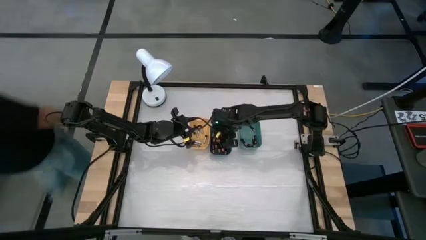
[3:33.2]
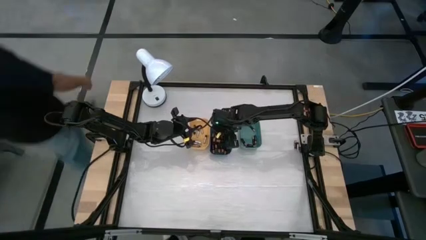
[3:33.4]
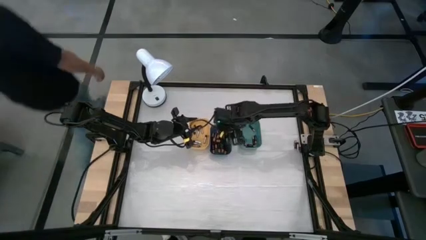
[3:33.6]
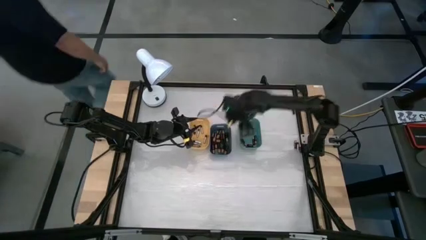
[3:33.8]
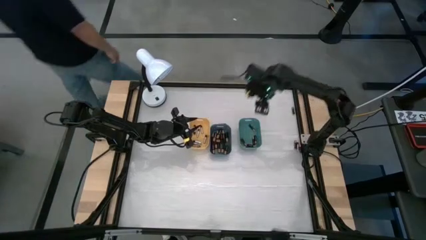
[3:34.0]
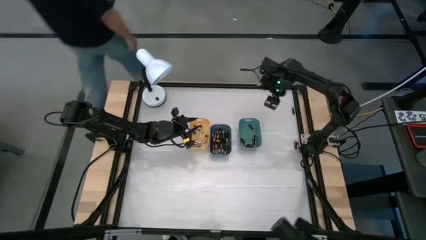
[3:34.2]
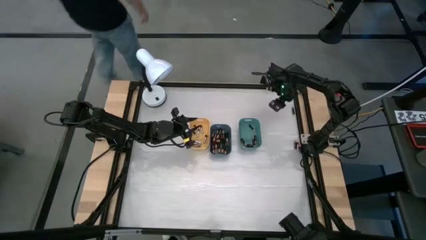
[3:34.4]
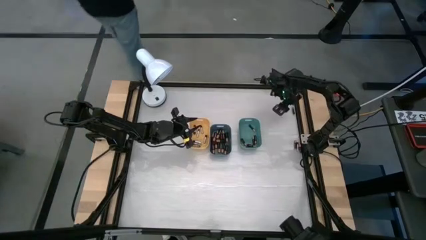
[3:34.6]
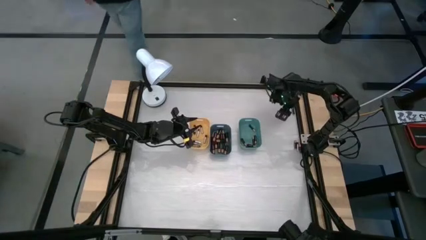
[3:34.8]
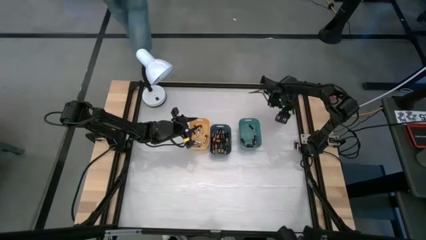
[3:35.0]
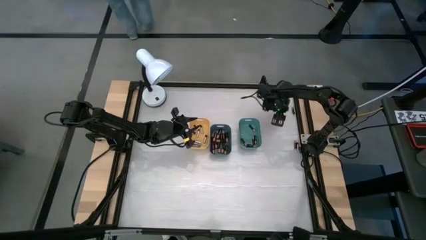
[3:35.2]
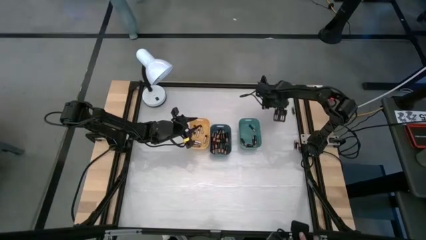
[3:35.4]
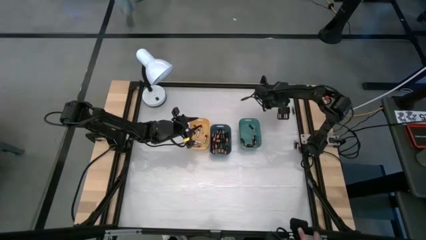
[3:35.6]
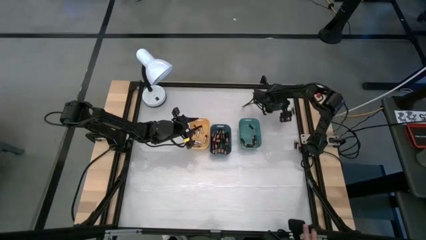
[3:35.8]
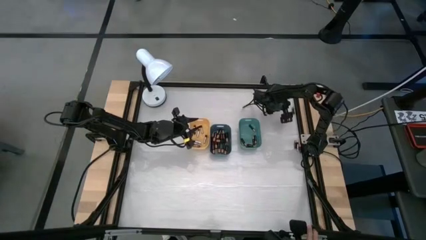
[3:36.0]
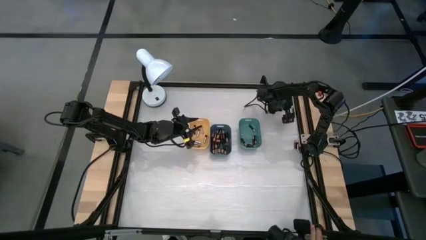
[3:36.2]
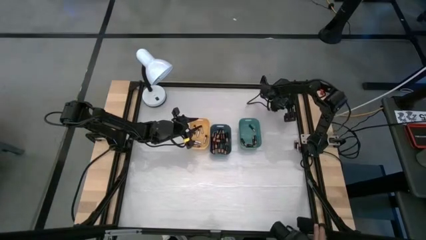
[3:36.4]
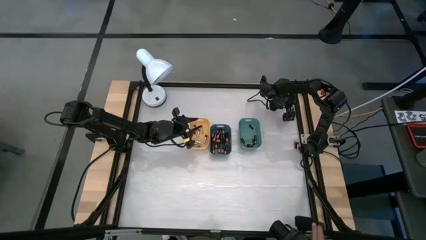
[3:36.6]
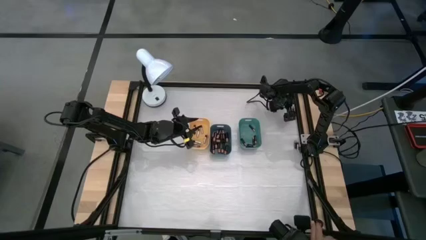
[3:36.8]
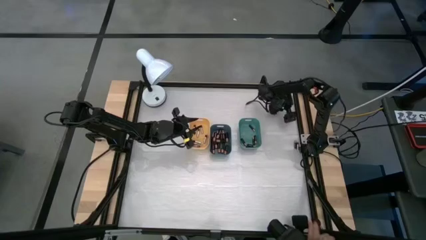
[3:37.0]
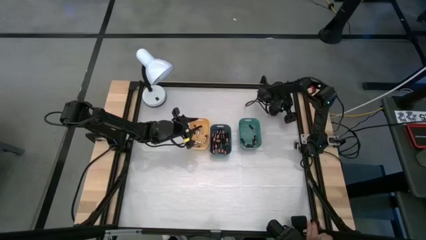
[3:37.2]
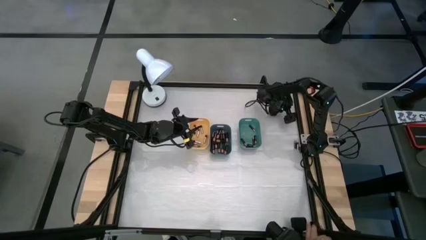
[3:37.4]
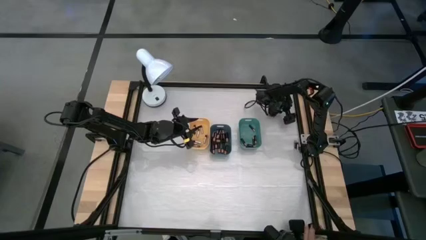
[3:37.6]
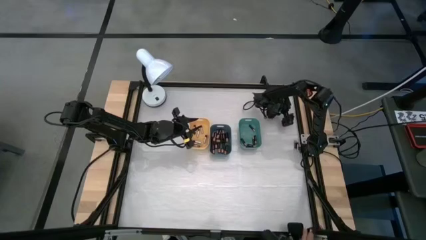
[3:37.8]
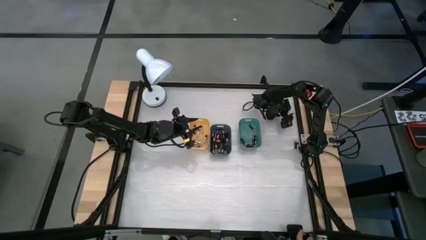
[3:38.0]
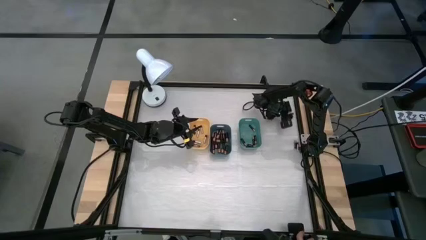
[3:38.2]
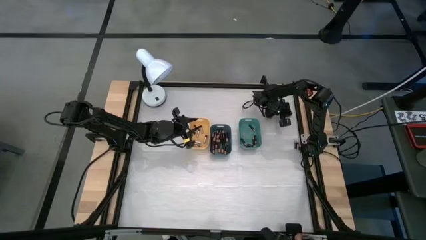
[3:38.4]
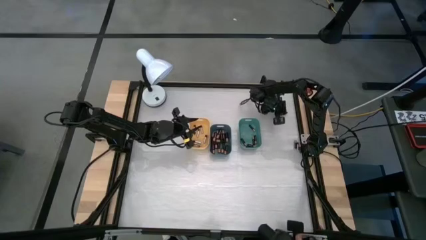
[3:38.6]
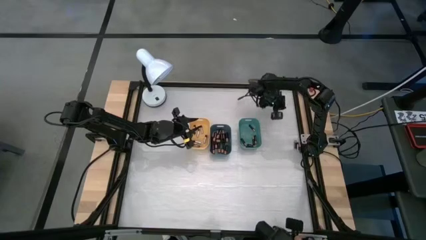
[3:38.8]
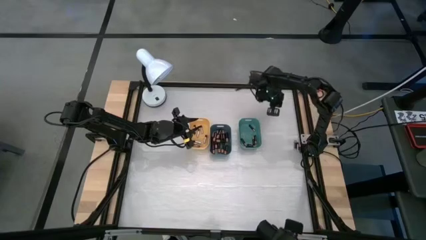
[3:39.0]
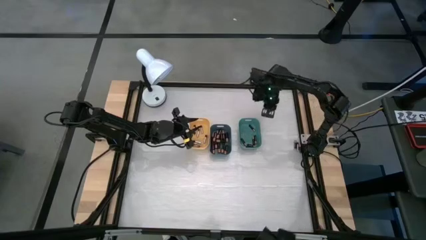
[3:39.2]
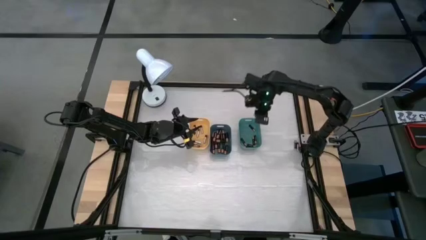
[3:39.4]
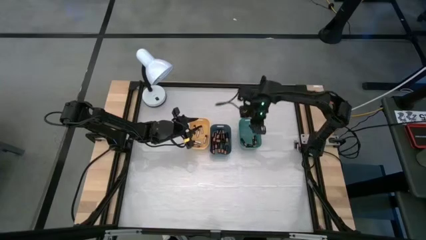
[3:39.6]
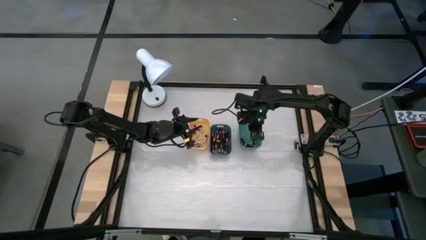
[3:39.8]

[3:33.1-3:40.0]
Task: Sort batteries
Put the black battery into the green bin

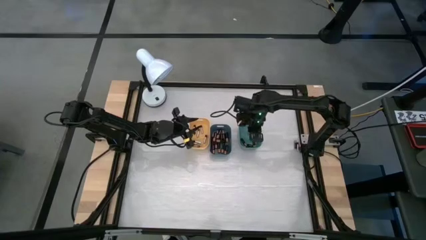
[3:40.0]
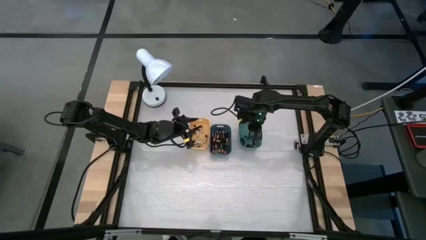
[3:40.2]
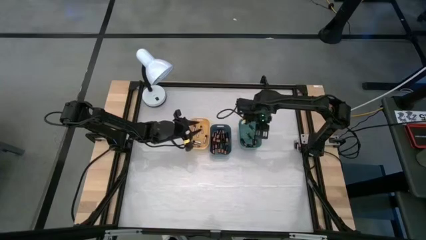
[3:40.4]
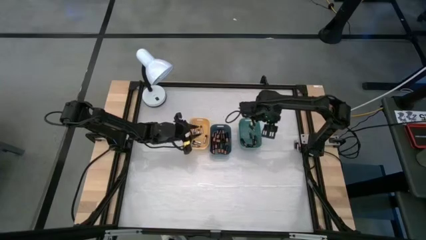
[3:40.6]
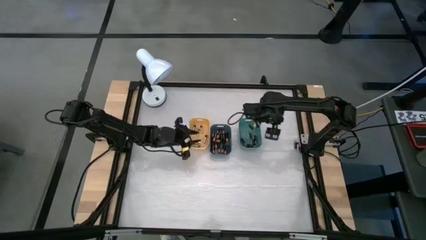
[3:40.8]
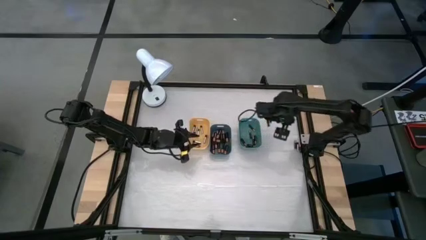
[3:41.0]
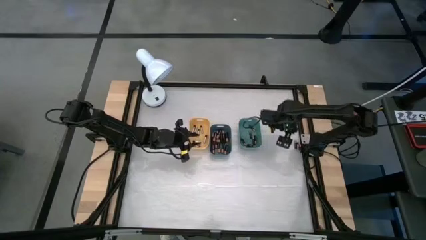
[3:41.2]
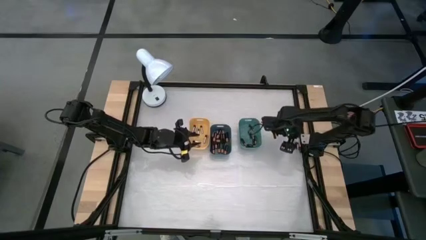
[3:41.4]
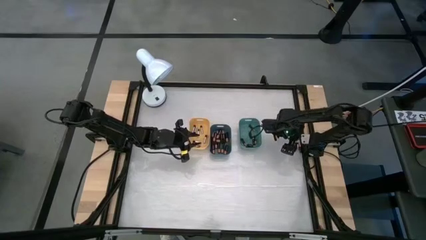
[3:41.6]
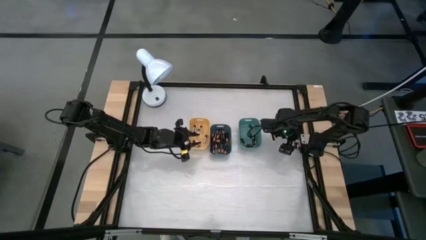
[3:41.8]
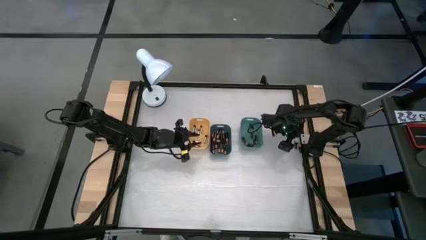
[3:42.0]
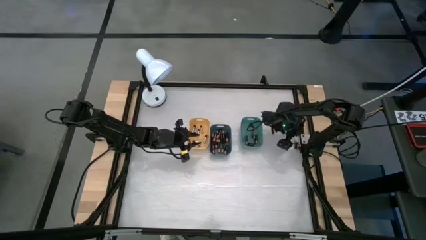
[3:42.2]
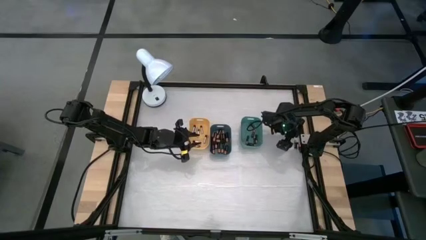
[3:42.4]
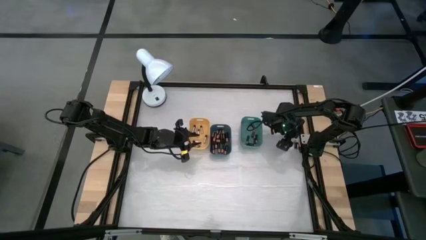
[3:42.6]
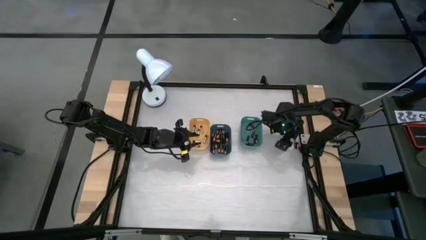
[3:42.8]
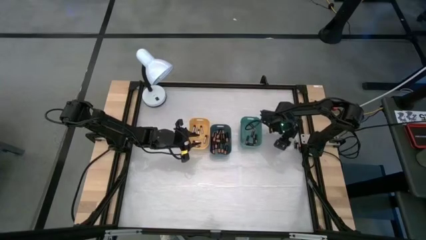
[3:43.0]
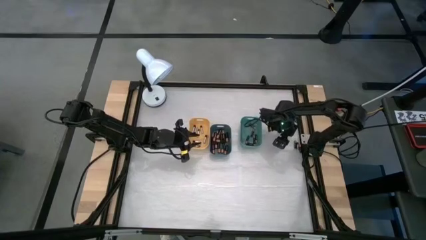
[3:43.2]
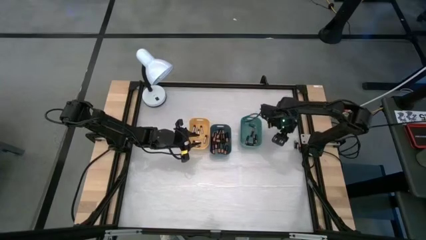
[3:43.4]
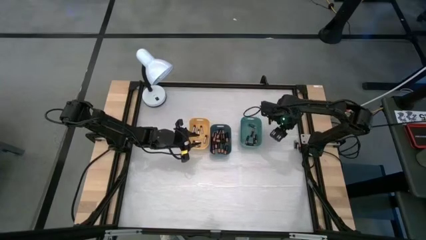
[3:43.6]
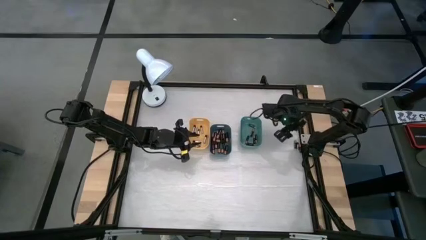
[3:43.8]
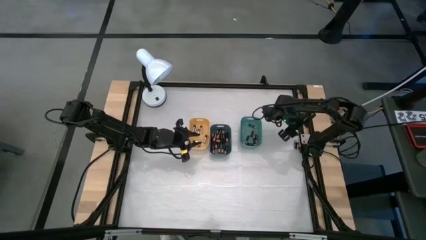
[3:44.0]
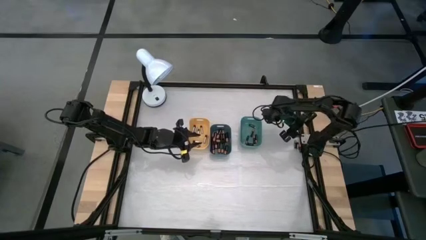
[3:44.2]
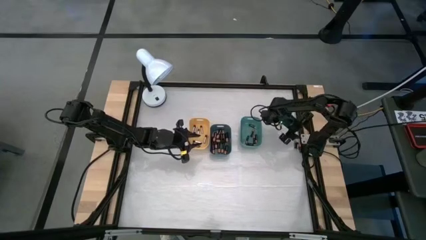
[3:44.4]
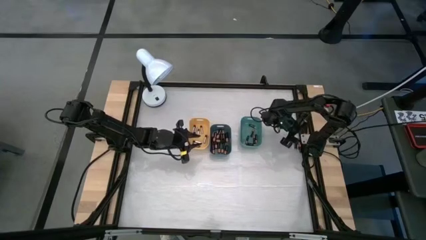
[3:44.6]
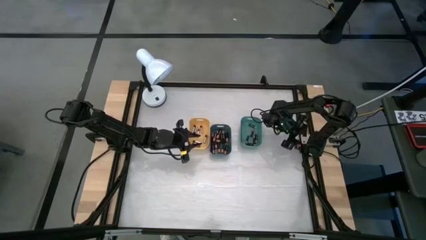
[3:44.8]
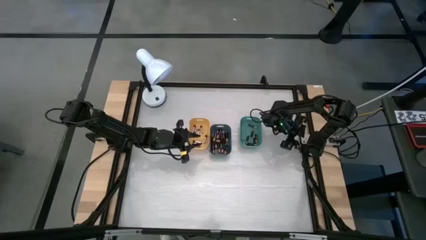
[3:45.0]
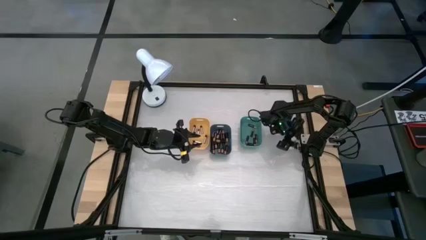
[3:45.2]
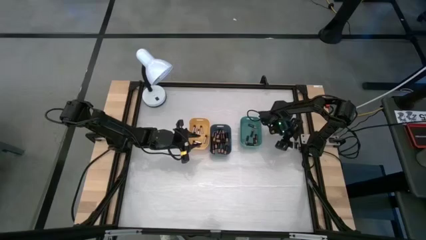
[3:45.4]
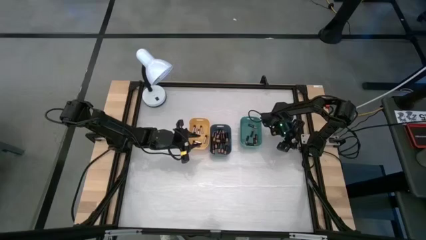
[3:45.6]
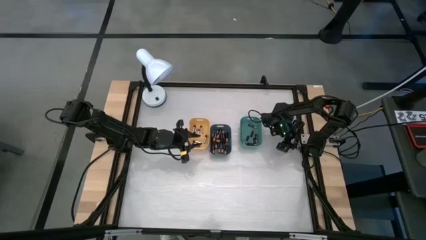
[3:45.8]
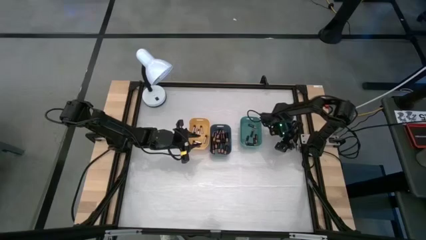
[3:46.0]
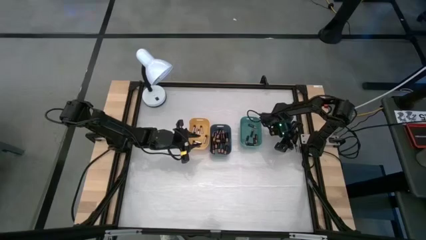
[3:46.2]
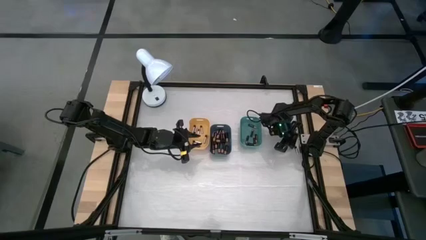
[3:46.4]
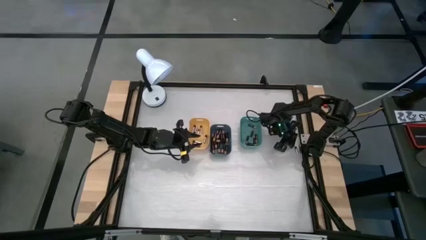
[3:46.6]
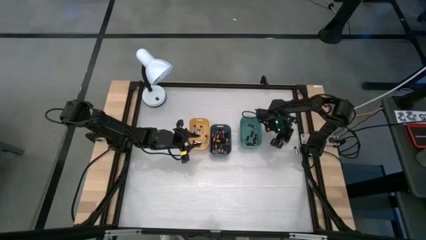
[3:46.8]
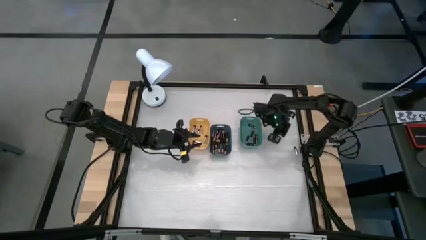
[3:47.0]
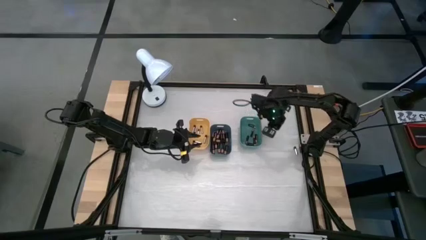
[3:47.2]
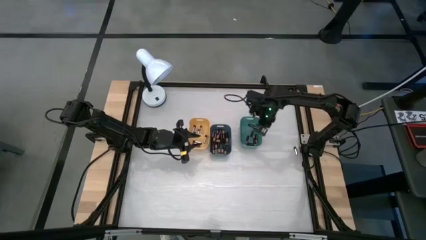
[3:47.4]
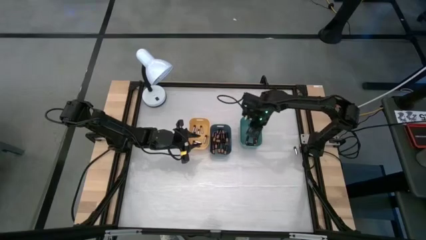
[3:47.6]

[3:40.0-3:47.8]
Put the black battery into the green bin
